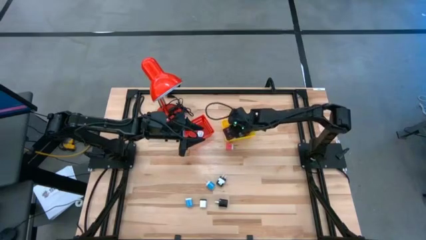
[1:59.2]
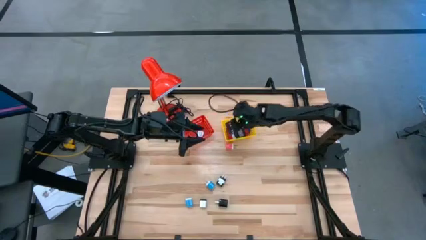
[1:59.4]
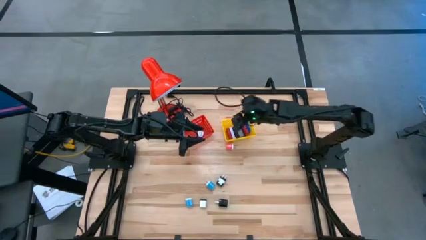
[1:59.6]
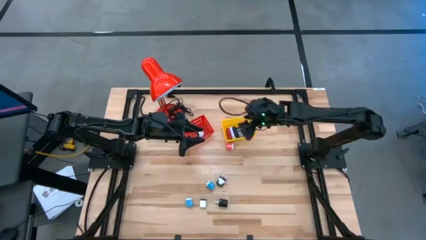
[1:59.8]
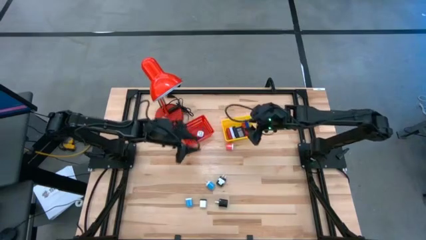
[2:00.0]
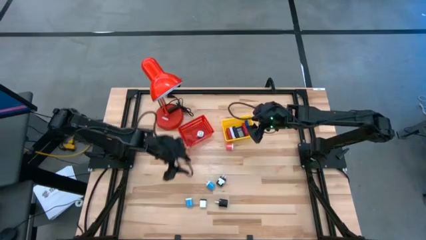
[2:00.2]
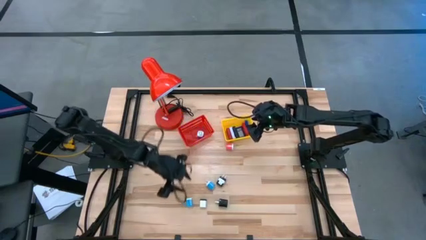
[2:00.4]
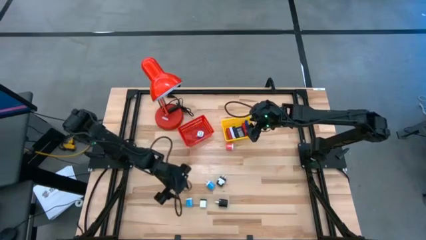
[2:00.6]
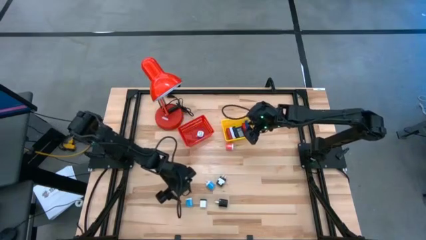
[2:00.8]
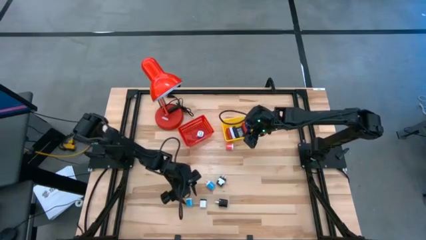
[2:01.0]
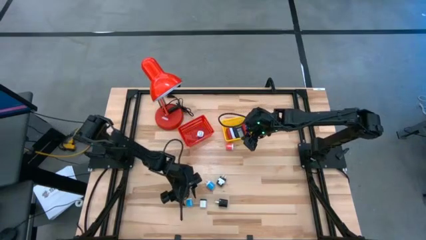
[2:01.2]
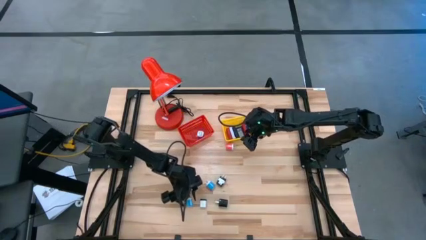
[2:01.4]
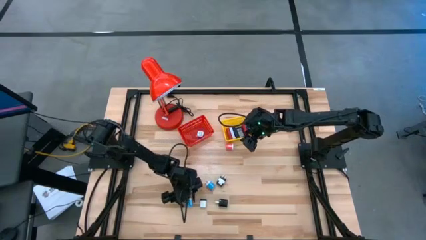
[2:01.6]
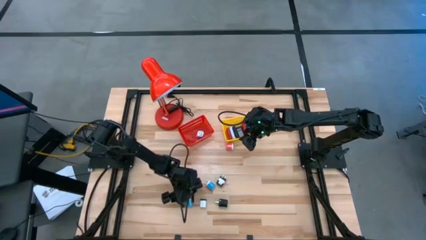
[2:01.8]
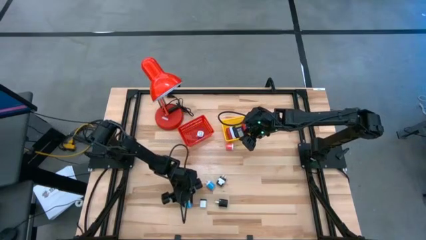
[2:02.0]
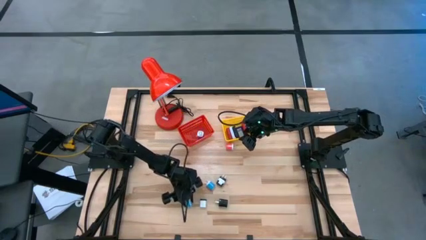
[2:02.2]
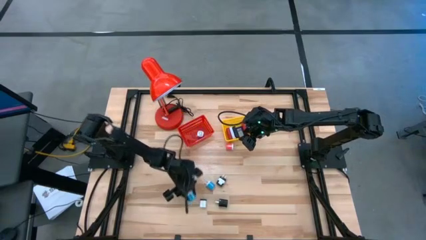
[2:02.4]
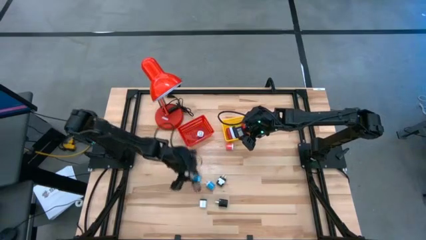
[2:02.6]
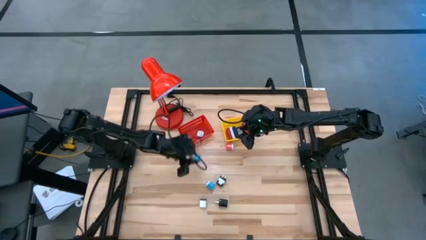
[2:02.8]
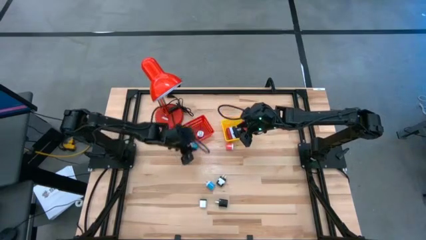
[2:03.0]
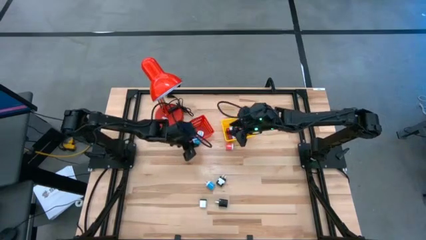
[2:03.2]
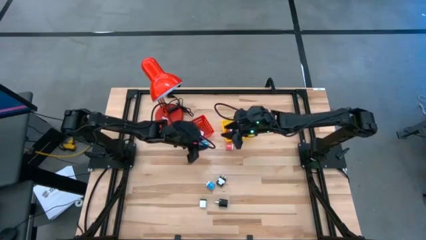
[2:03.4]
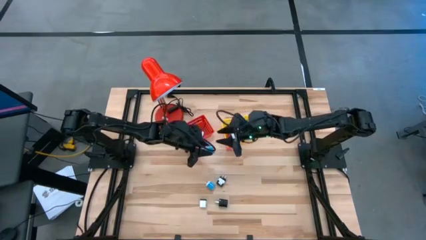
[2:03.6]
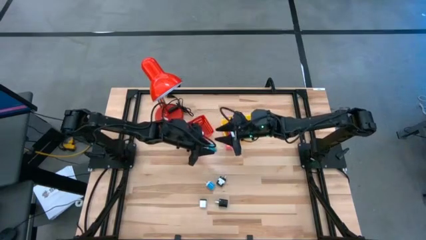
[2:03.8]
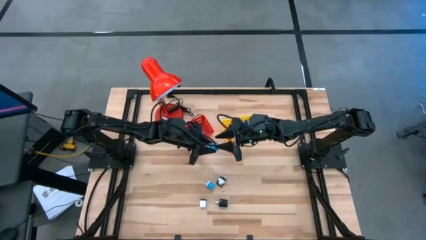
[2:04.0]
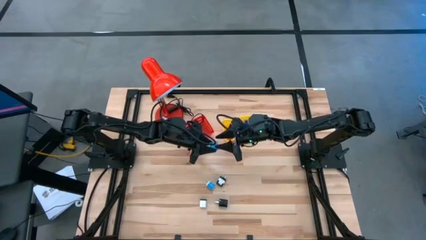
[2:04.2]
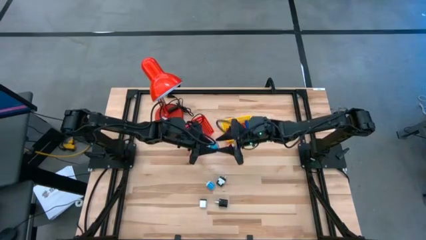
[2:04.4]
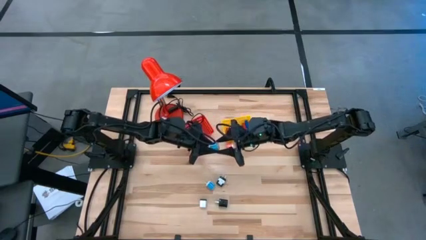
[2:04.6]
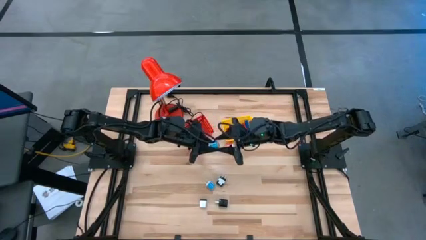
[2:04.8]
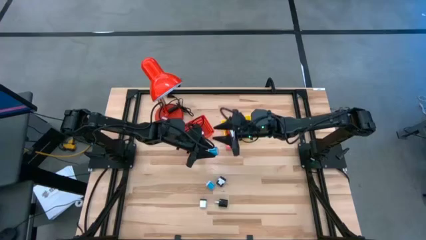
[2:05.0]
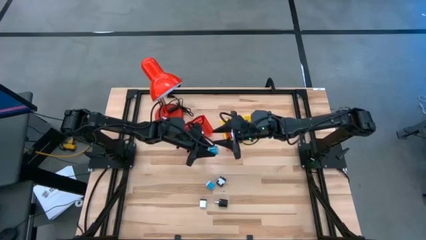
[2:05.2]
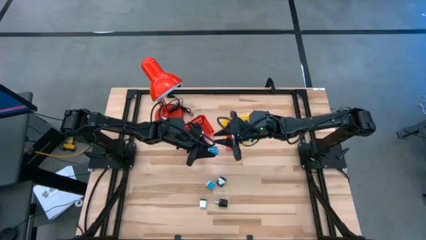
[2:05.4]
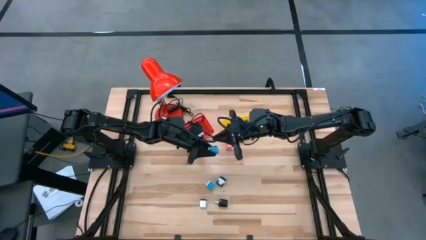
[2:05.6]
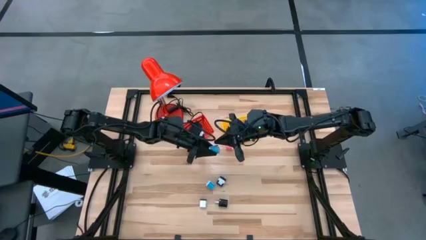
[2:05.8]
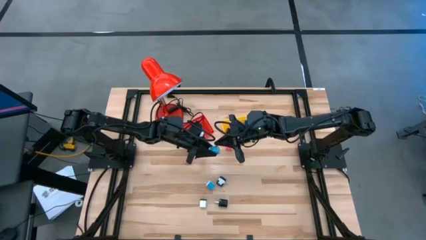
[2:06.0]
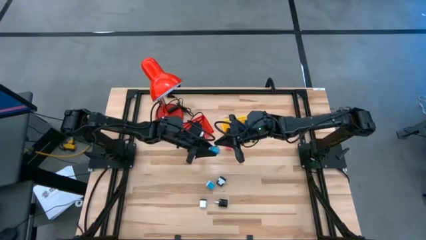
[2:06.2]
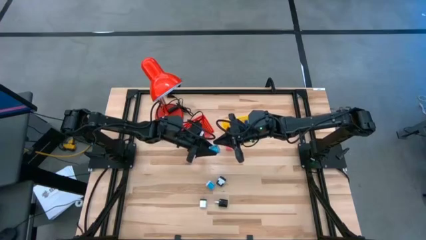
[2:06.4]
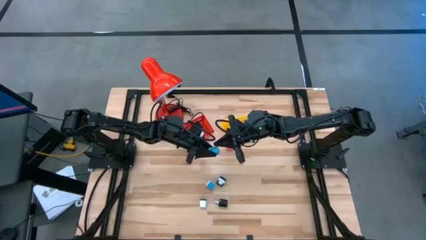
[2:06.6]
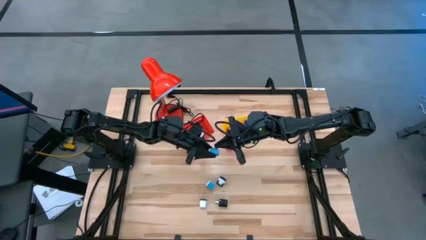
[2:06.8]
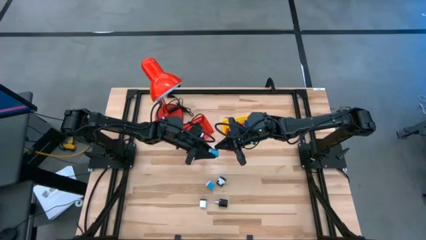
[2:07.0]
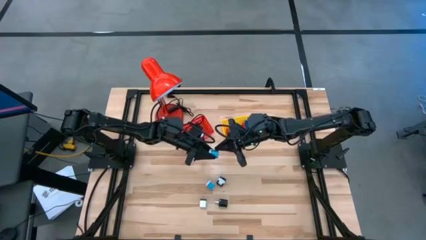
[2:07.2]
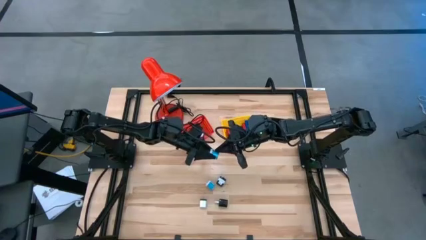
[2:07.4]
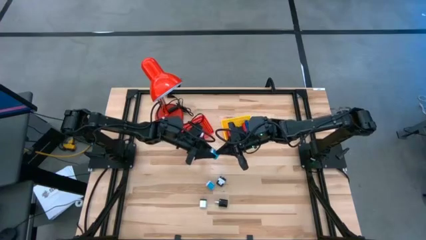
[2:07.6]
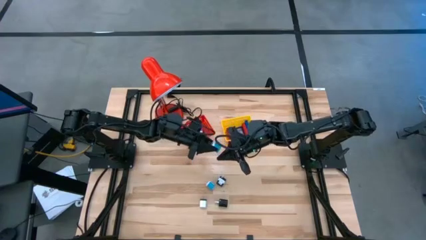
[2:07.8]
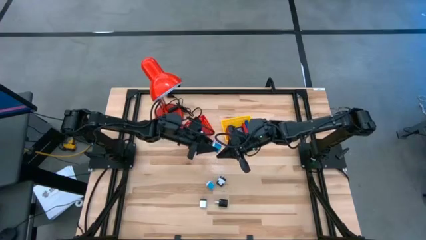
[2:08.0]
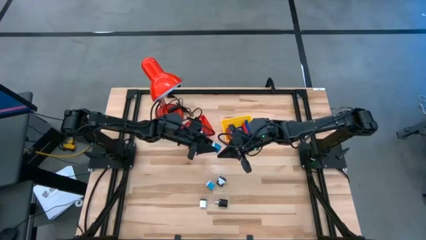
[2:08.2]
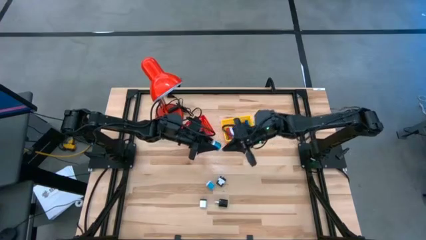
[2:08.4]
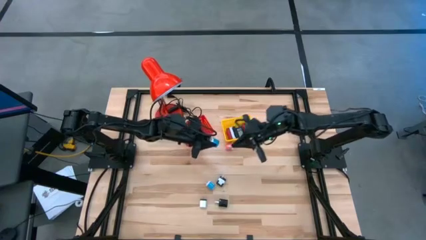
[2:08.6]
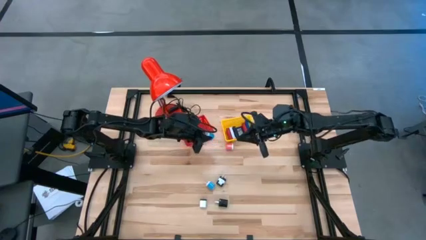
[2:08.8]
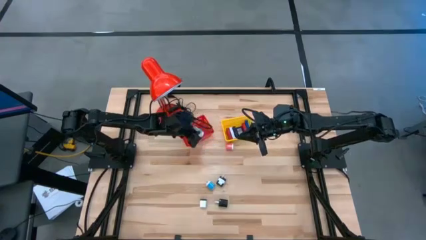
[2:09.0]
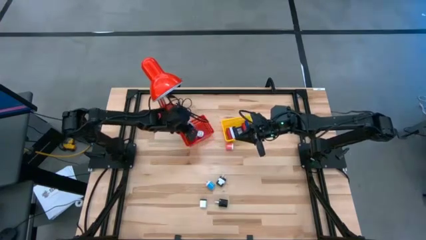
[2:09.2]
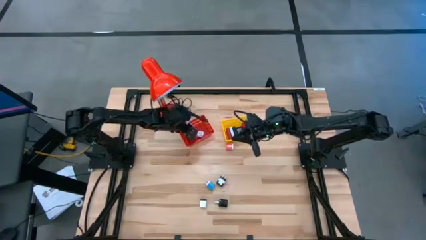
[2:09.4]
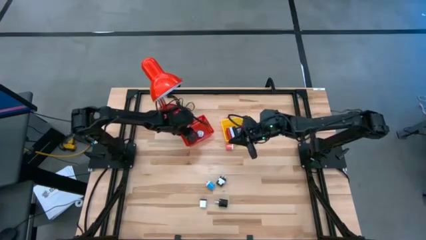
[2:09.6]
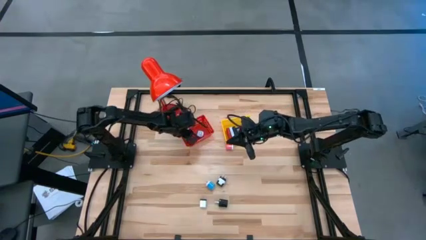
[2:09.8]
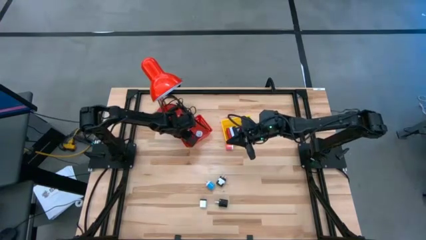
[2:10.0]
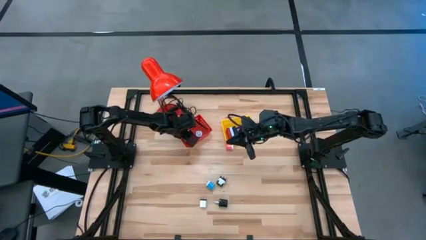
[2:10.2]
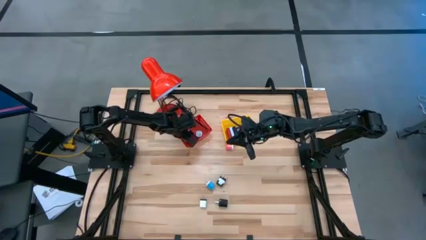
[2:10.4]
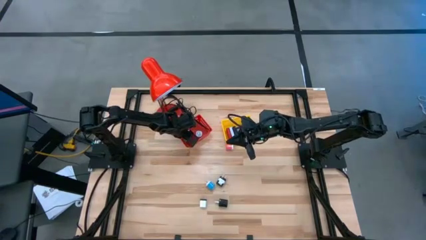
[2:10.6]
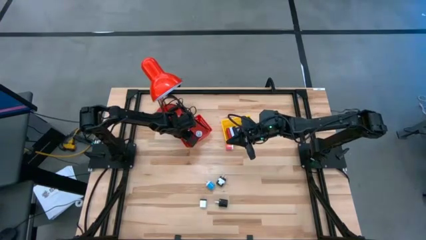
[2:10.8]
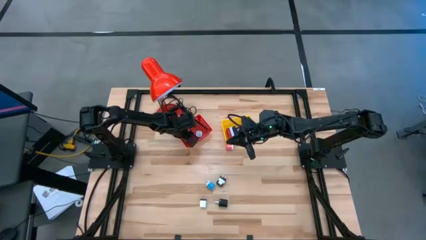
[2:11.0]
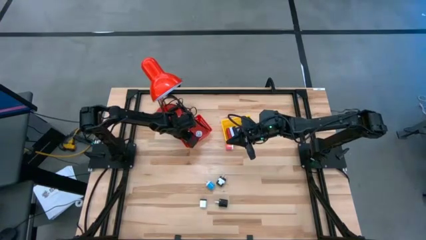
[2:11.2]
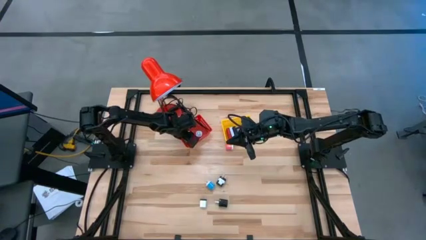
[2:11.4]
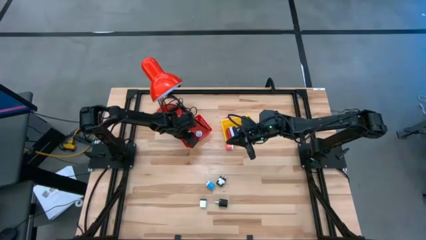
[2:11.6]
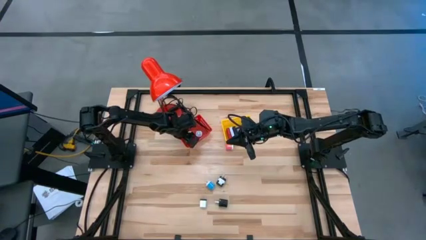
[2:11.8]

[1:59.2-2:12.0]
Task: Pick & Place Office items
Put the bottom blue charger adapter into the red bin
